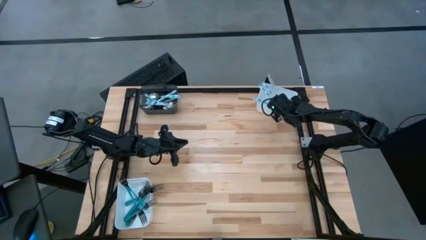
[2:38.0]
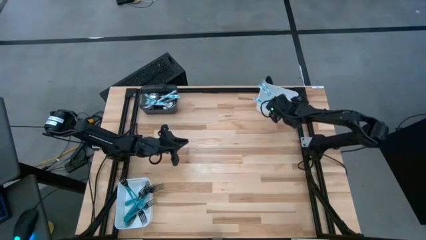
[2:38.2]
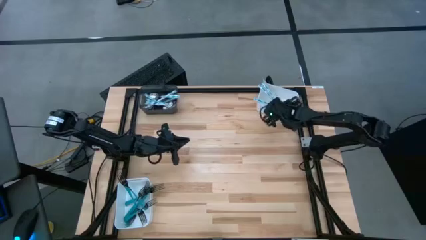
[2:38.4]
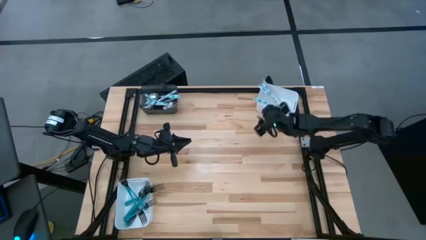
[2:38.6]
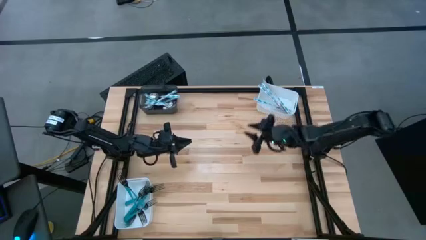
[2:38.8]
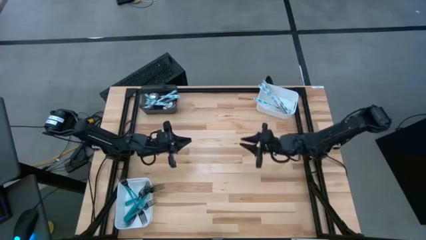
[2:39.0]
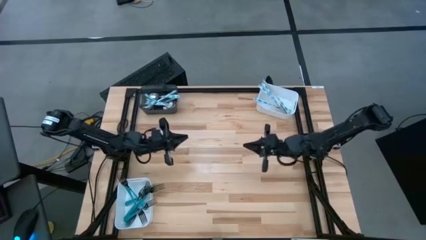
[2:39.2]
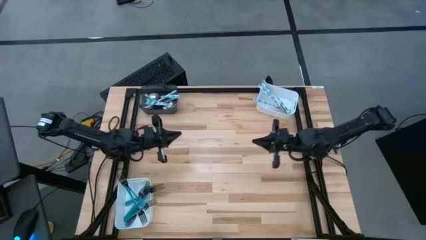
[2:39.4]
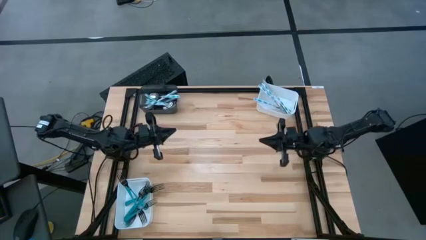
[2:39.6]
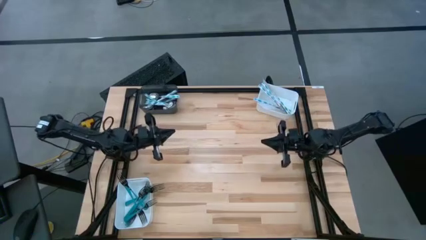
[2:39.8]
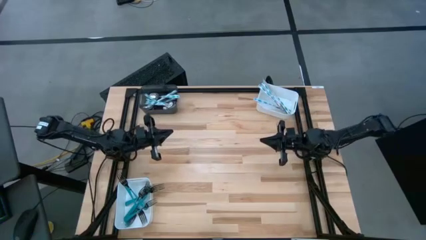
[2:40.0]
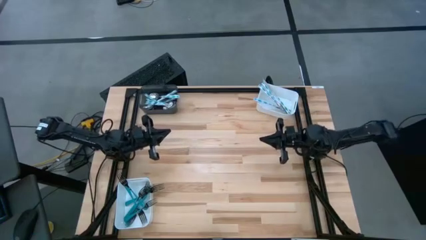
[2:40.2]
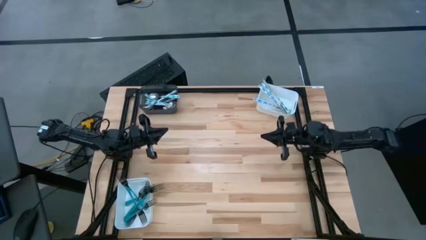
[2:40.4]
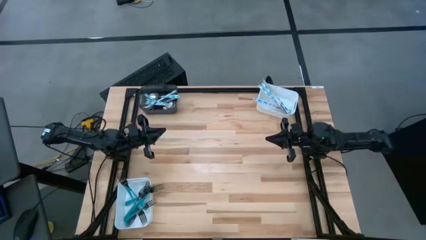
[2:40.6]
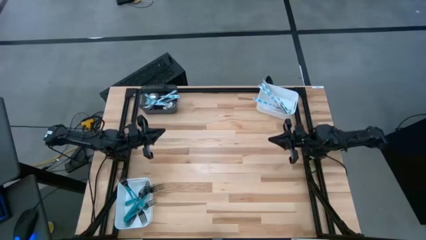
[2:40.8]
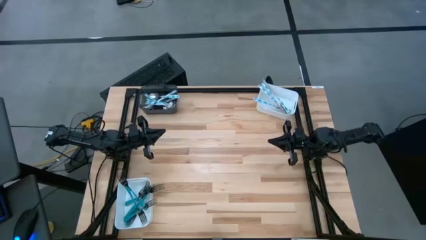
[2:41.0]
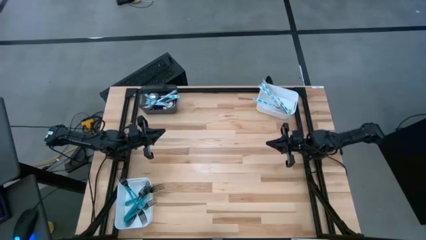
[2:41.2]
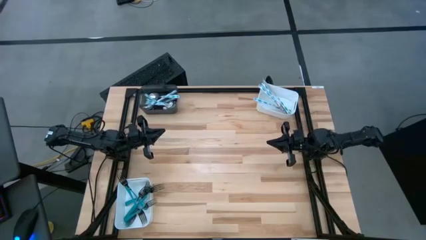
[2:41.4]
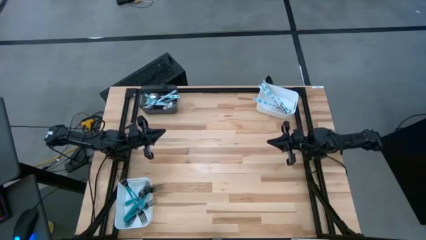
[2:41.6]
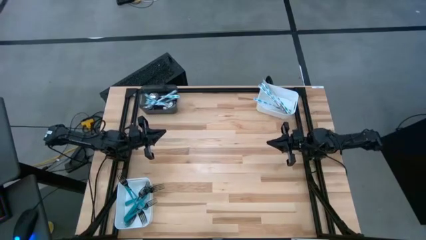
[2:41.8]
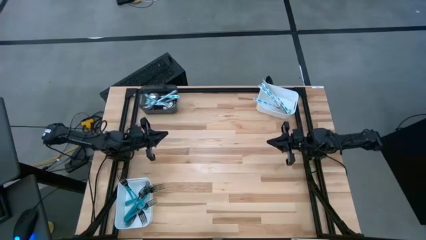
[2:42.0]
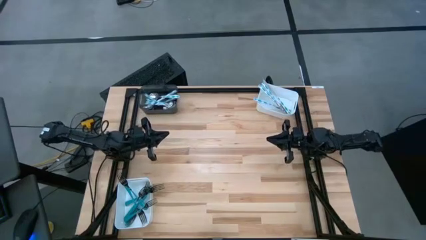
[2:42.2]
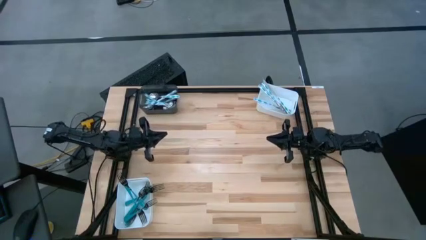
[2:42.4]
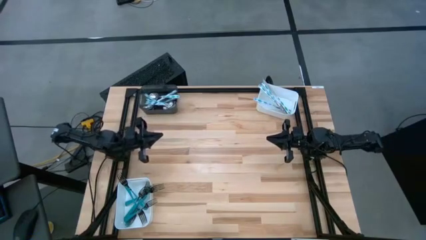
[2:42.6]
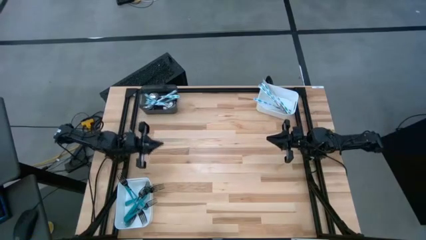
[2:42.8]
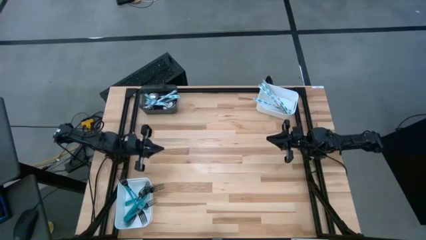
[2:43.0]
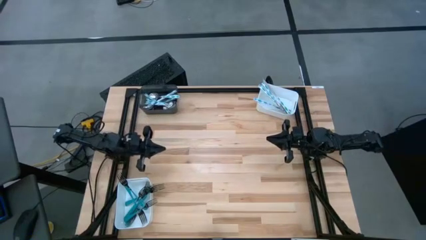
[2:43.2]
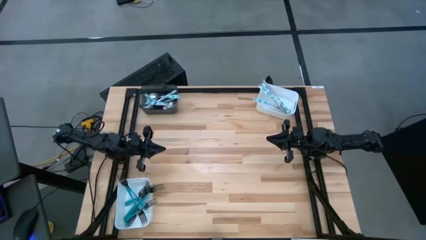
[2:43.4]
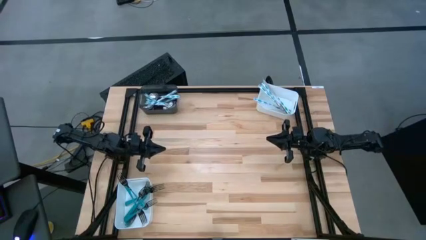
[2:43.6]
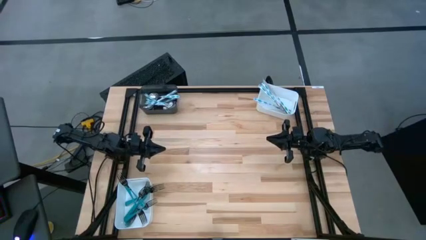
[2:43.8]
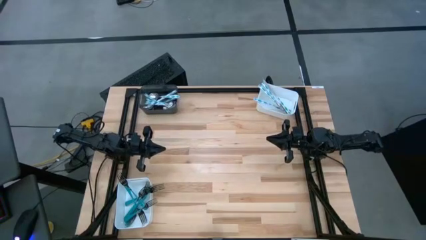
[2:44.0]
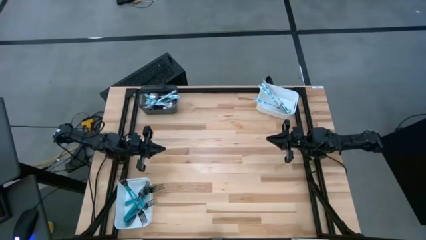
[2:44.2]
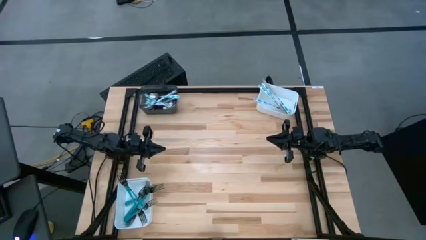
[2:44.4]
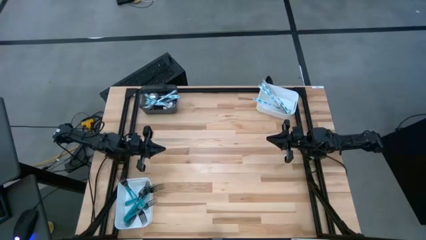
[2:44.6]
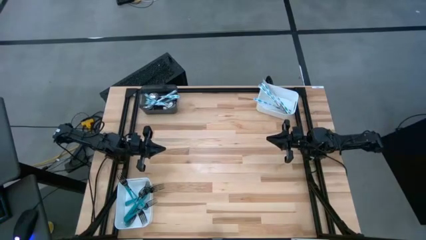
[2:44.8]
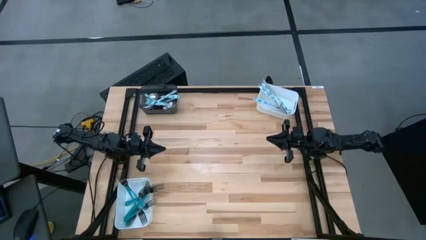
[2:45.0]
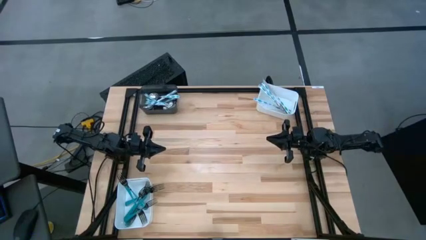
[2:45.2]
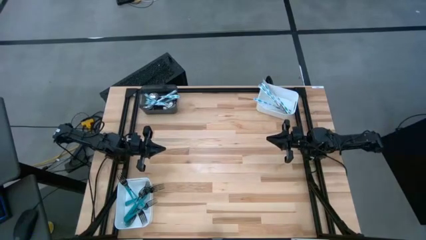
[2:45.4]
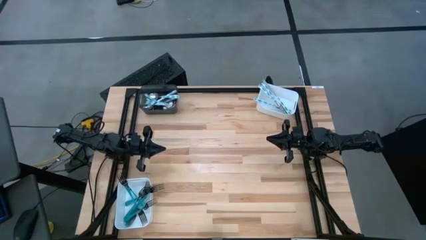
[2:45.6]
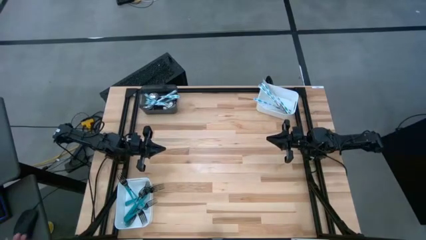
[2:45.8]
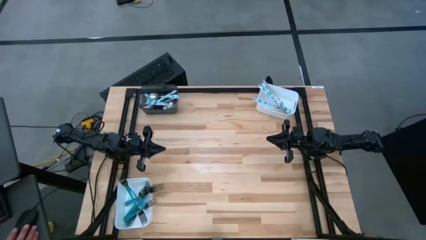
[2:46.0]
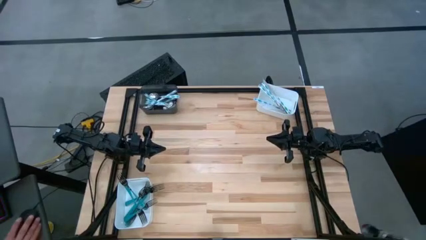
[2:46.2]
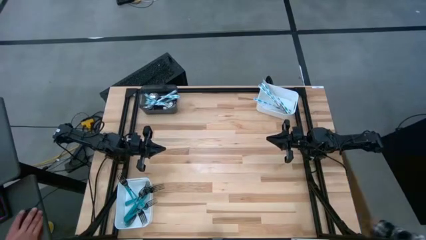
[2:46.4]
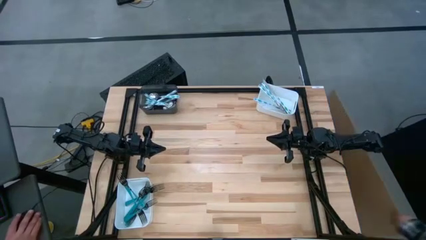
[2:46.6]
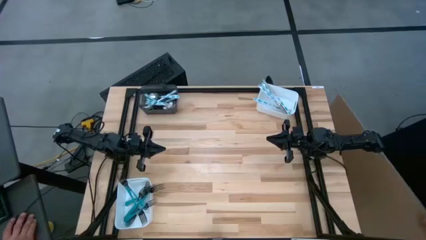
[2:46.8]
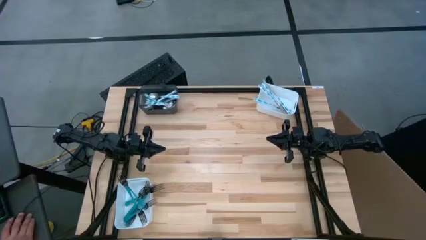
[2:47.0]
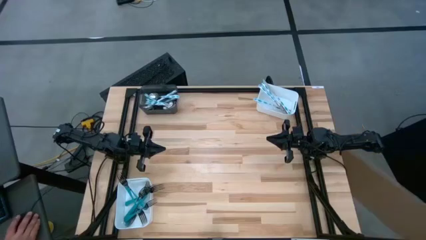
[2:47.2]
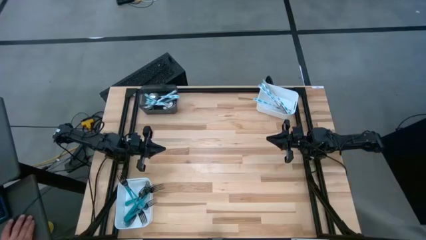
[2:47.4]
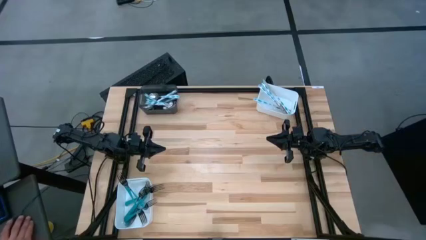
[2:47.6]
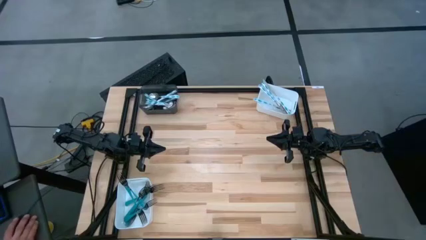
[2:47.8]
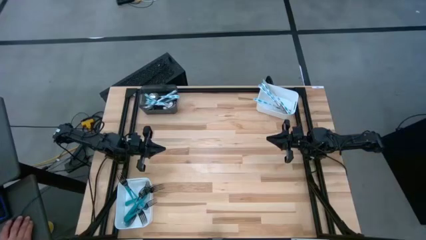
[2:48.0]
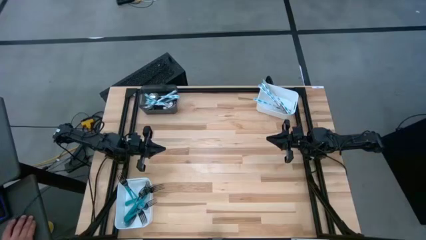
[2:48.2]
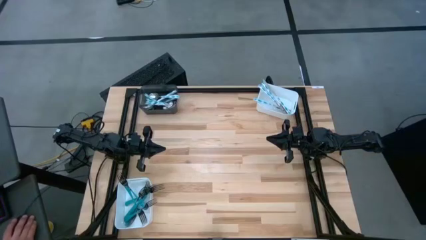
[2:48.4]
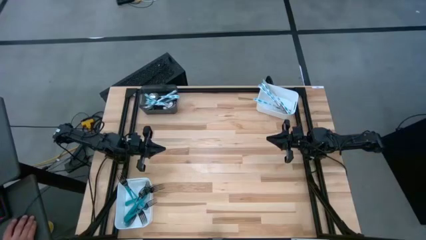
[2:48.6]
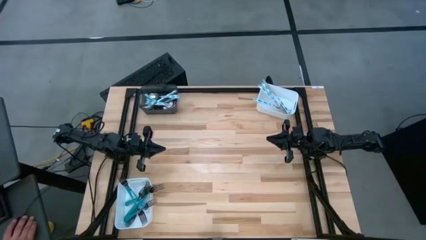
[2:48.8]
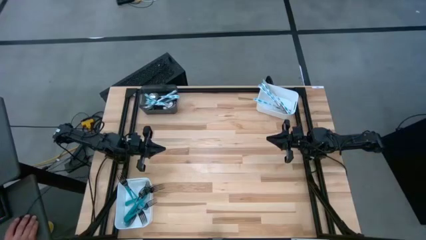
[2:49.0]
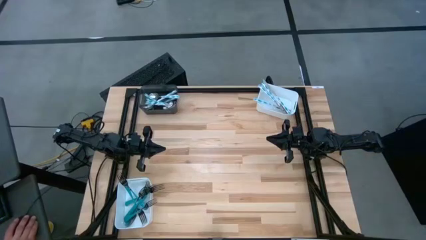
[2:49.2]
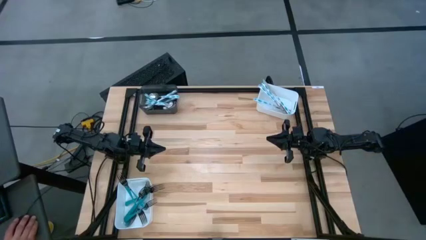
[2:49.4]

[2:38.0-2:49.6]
Task: Sort silverware by color (type)
Return to Home Position
